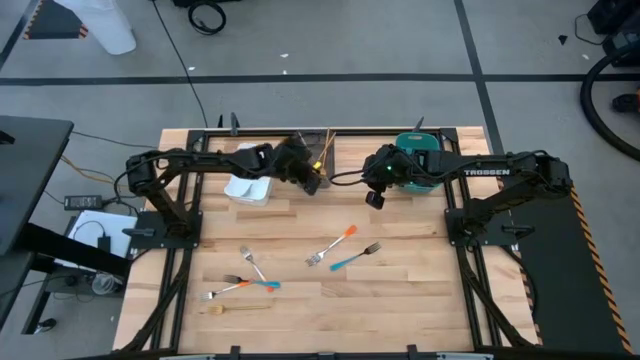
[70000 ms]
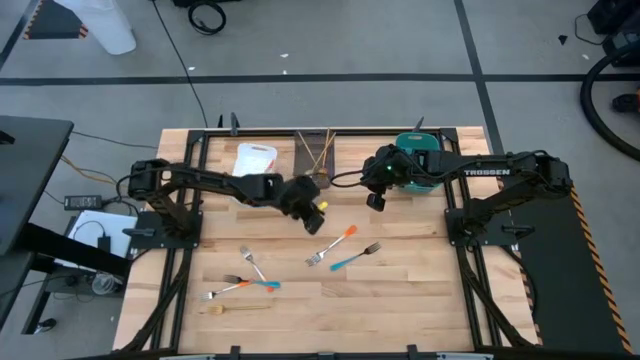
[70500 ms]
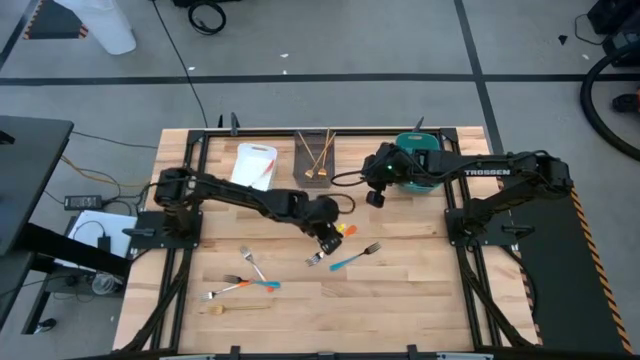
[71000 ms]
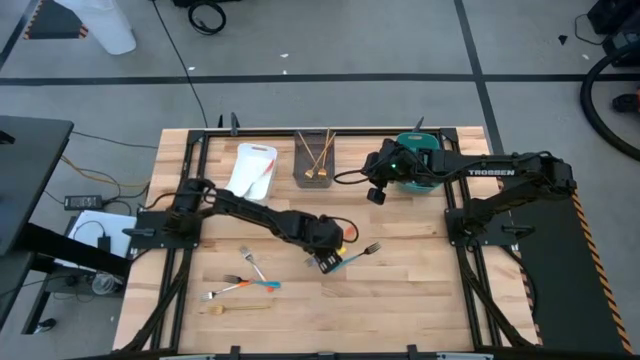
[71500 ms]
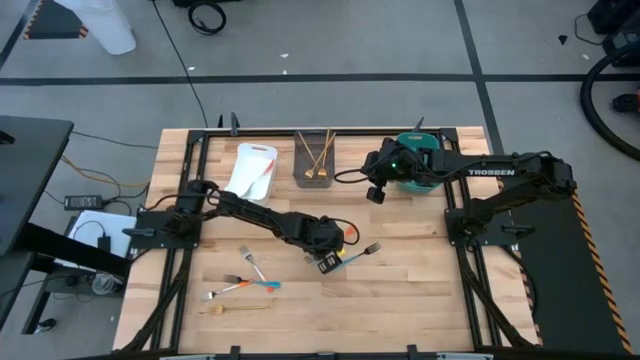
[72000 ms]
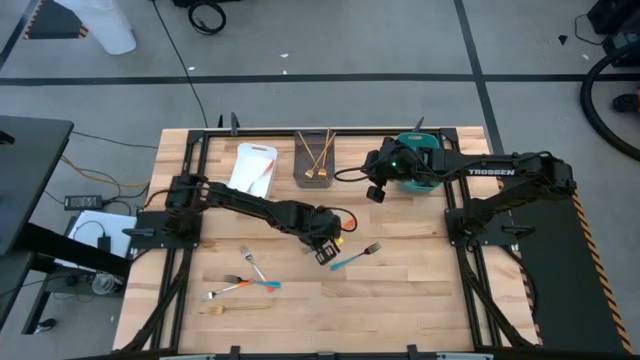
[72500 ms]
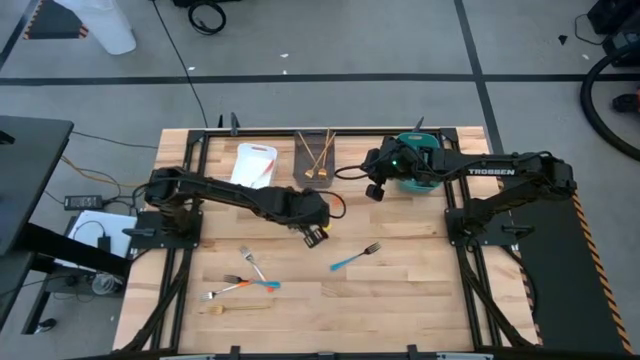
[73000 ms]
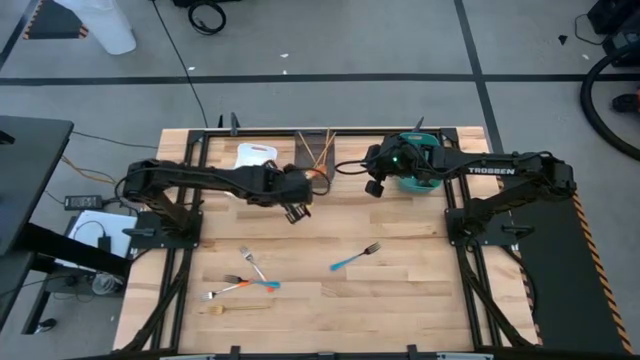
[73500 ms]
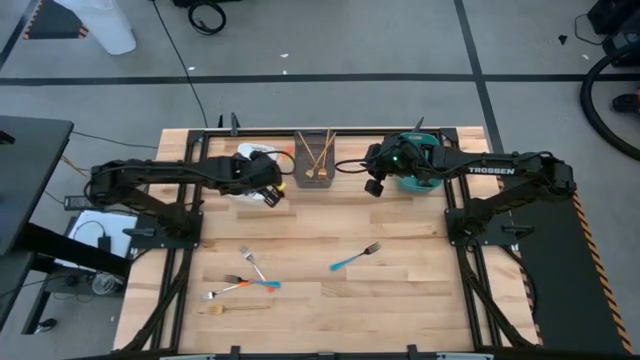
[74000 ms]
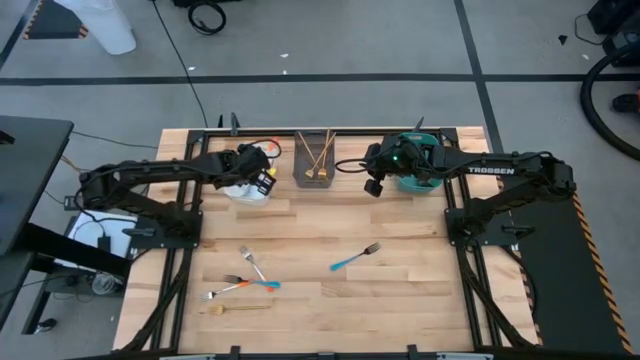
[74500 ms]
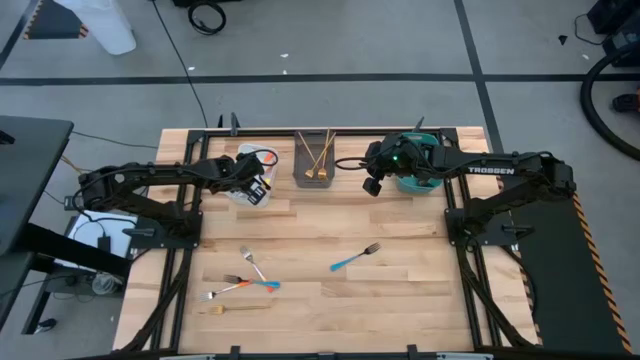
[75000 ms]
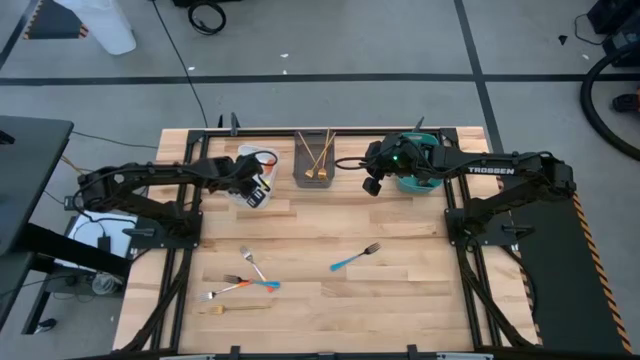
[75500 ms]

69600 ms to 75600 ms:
Task: Sort silverware by color (type)
Put the orange fork into the white bin

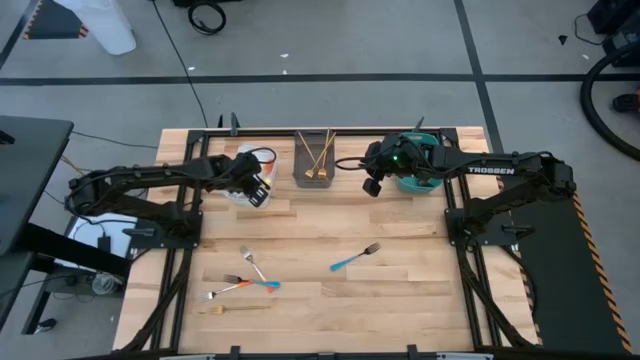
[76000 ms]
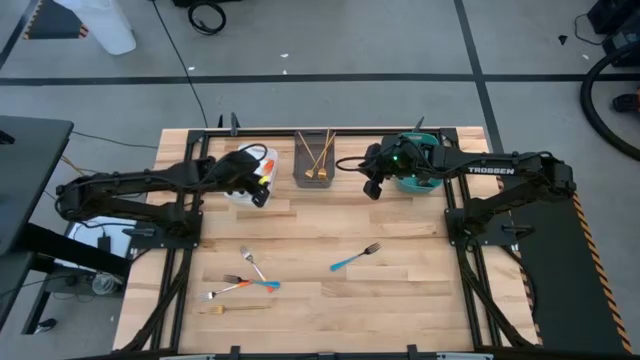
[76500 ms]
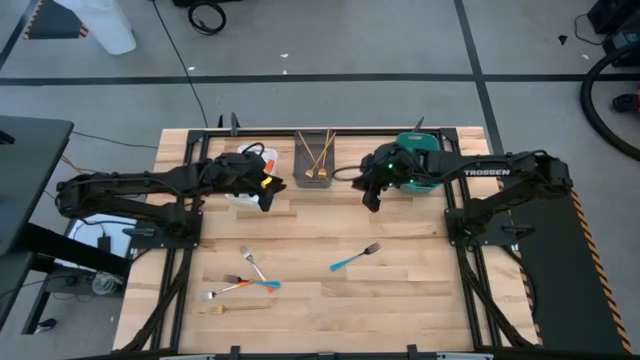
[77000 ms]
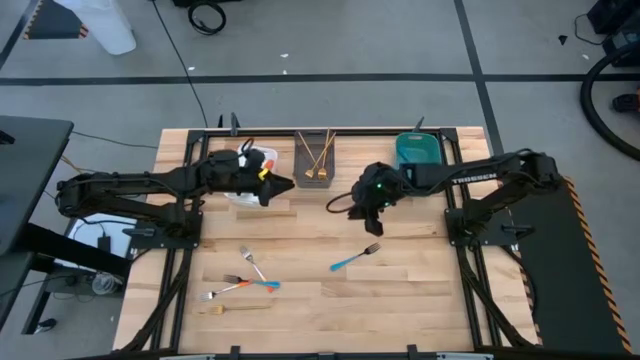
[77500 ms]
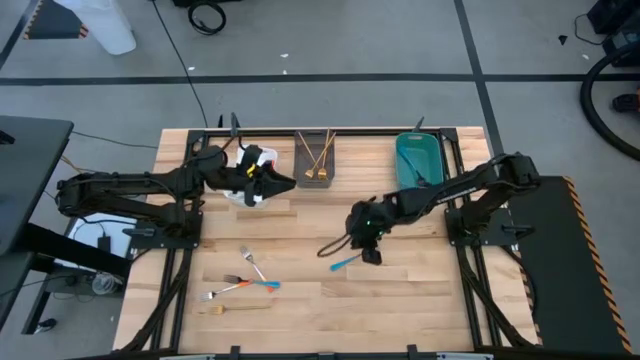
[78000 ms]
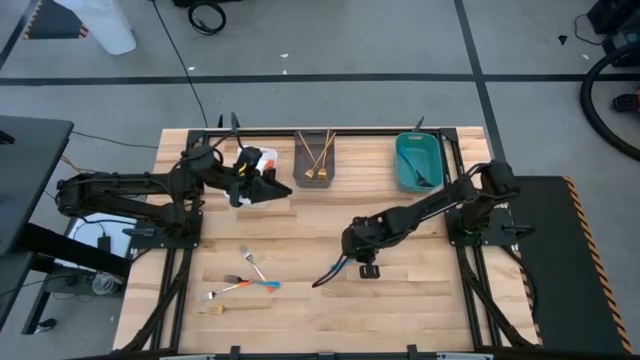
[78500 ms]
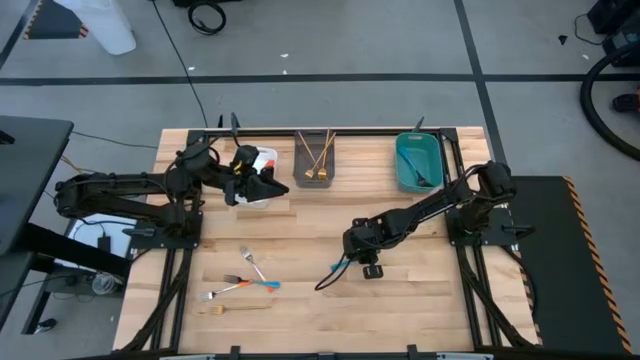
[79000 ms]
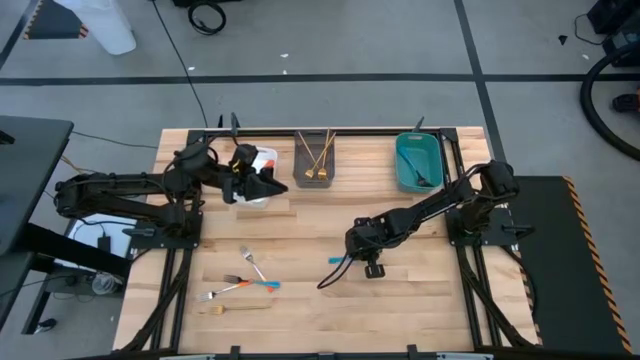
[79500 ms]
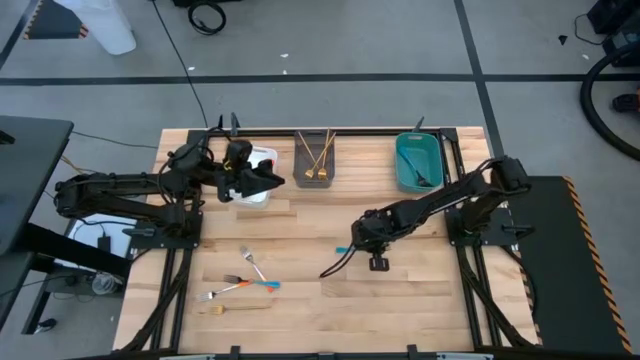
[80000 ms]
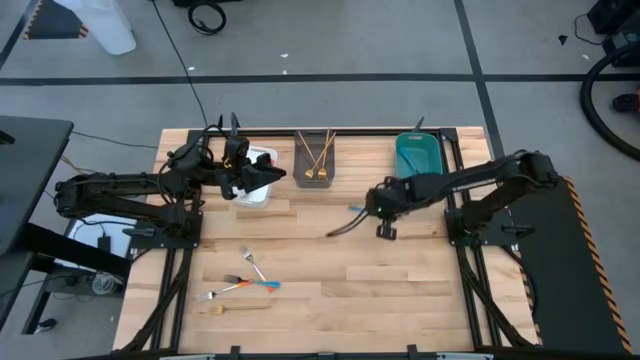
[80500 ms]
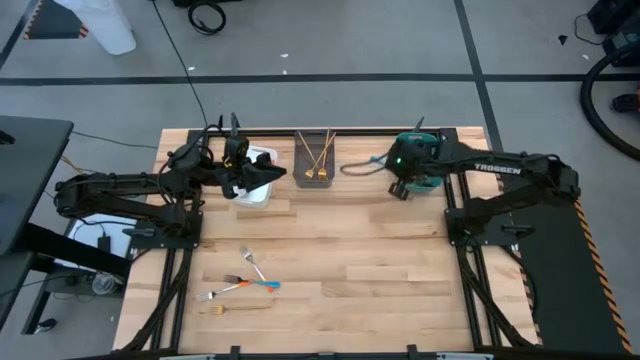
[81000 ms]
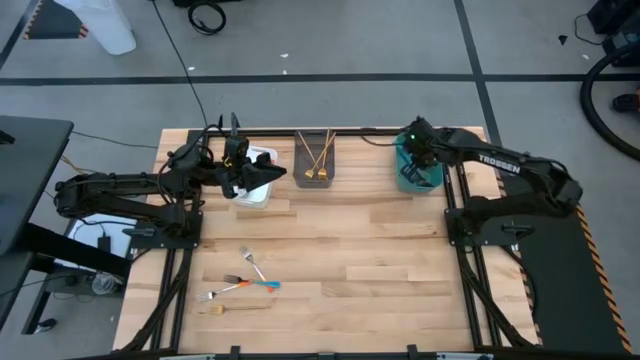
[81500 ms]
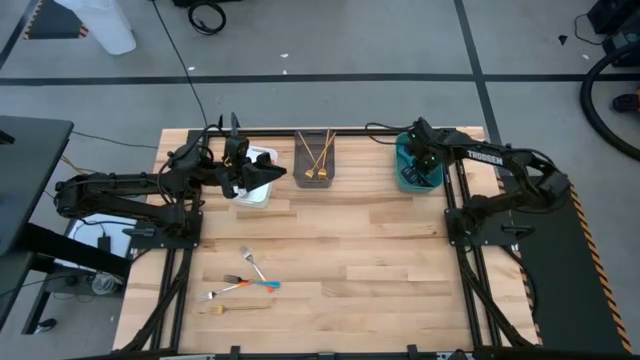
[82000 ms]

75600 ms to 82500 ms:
Put the blue fork into the green bin

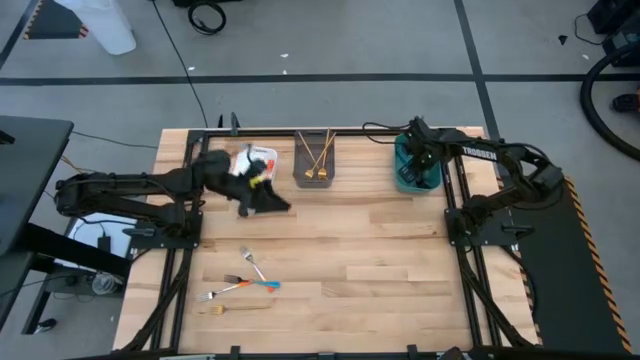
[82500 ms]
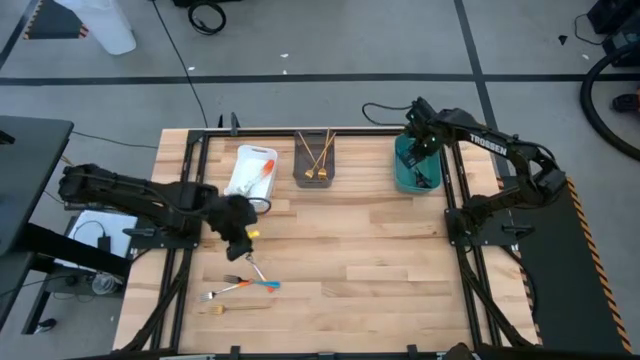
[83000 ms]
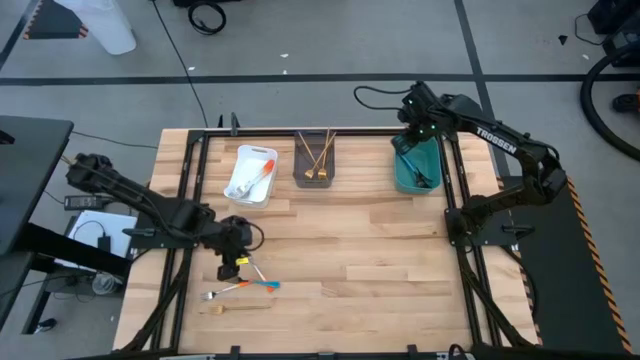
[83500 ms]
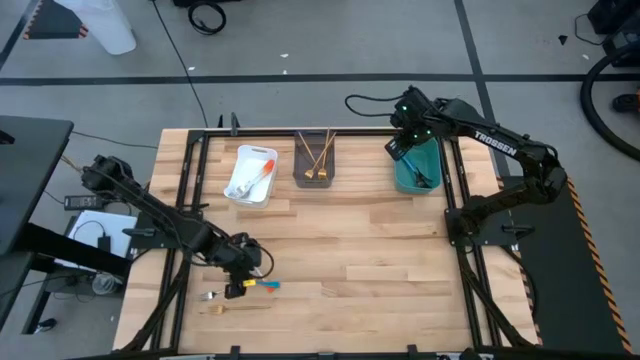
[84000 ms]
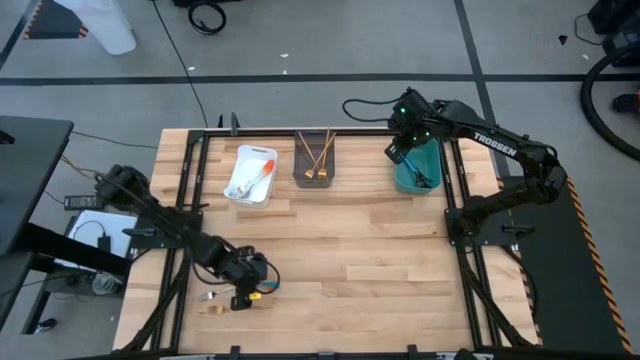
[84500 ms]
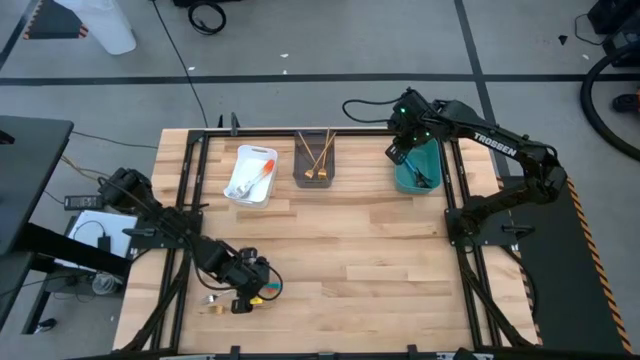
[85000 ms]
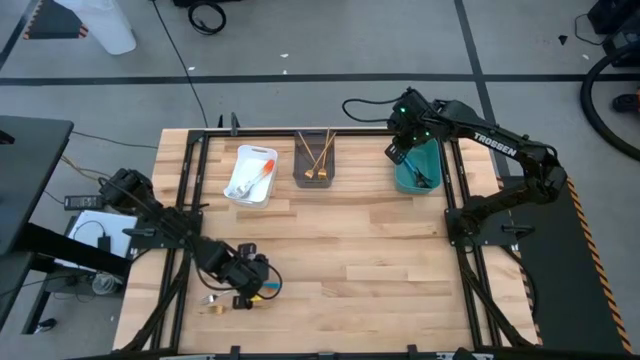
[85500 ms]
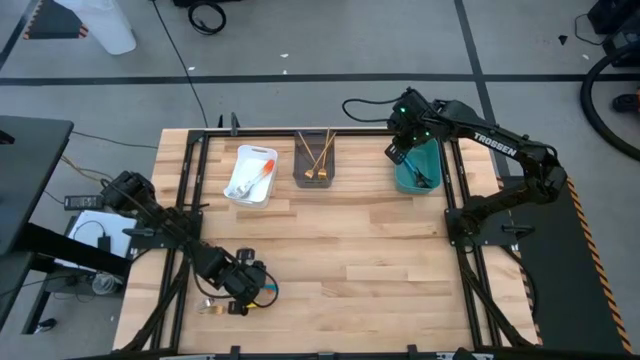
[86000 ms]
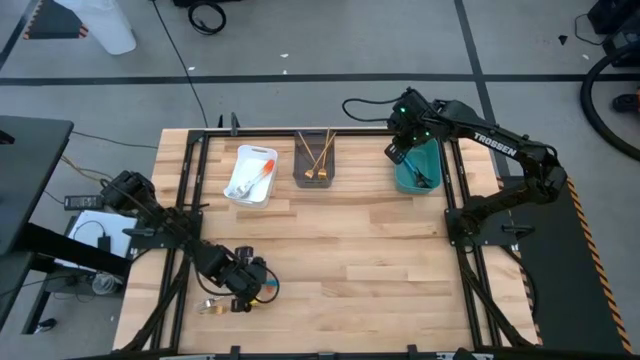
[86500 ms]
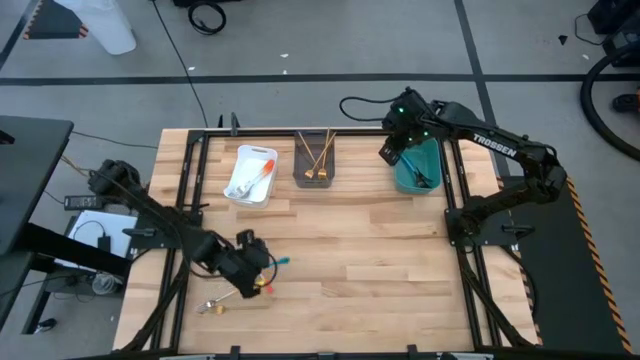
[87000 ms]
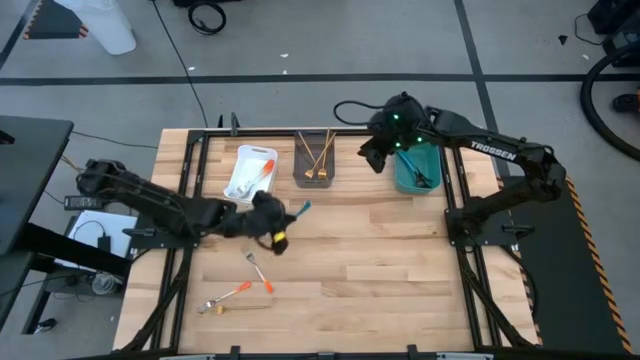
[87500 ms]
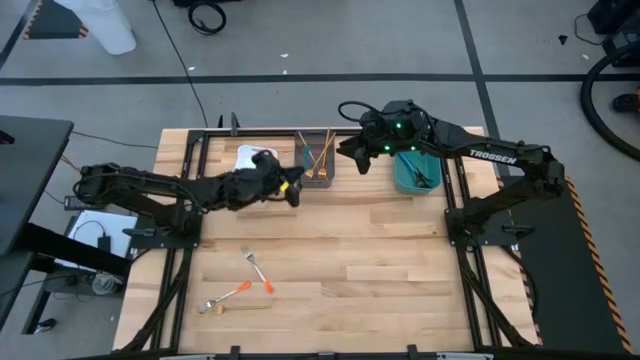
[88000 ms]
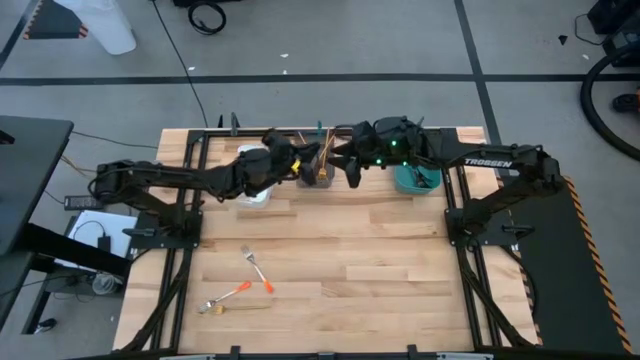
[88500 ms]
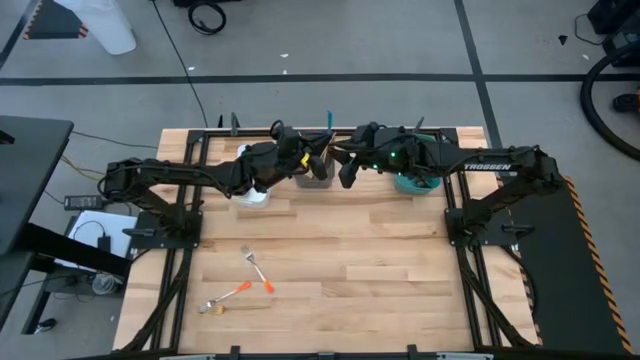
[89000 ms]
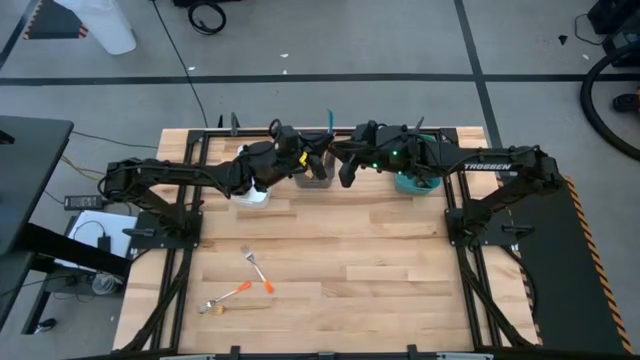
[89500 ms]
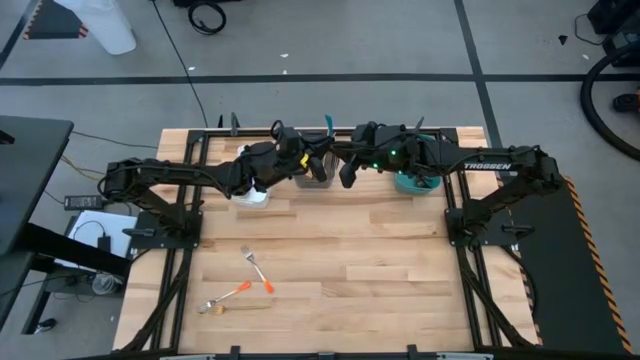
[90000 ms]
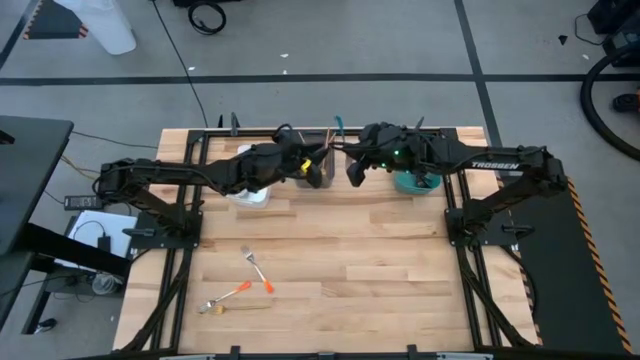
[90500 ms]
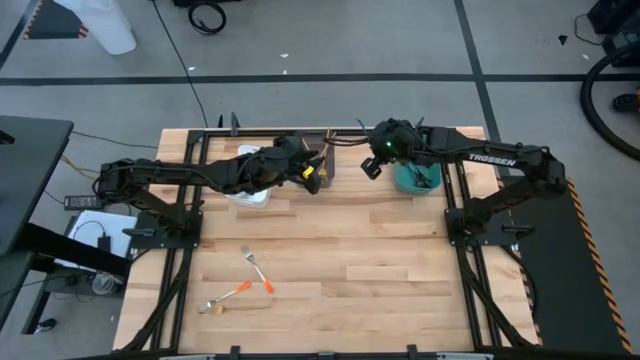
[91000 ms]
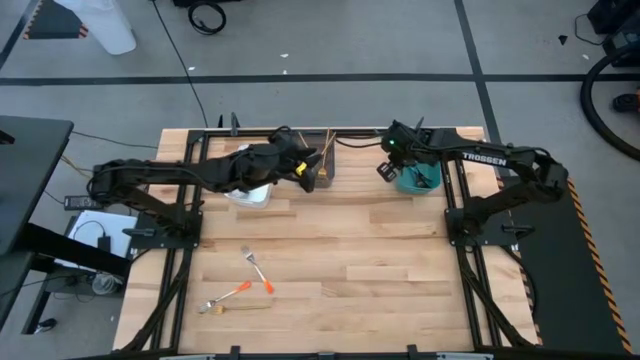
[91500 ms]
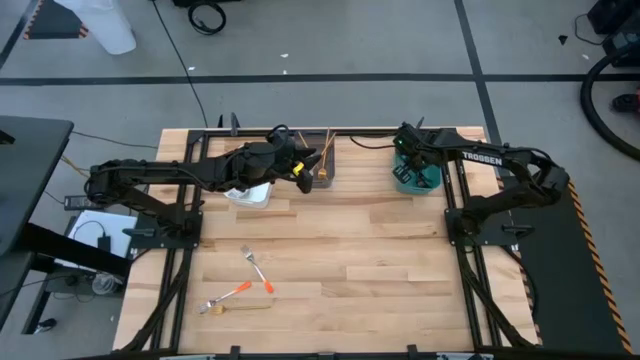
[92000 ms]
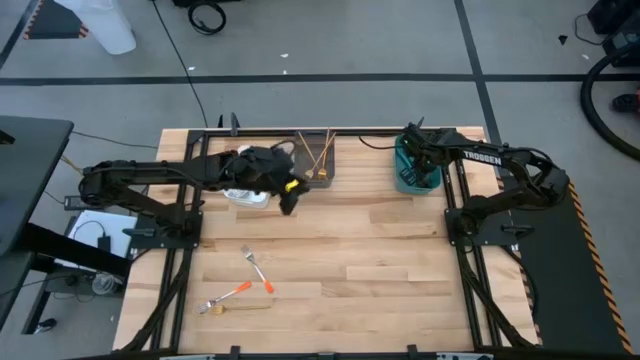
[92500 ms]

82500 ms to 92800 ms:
Put the blue fork into the green bin
